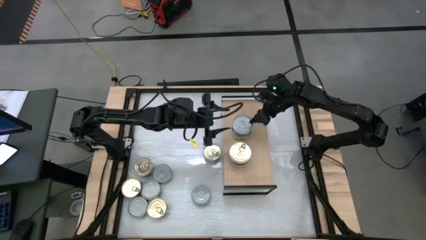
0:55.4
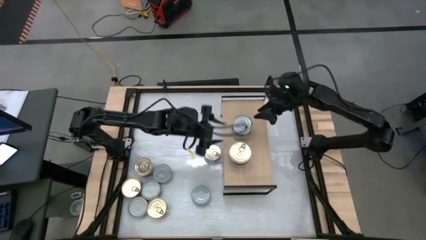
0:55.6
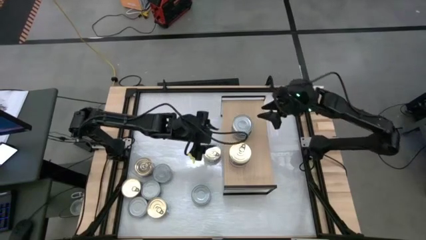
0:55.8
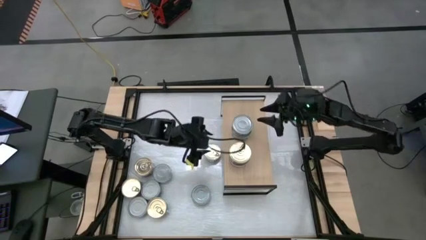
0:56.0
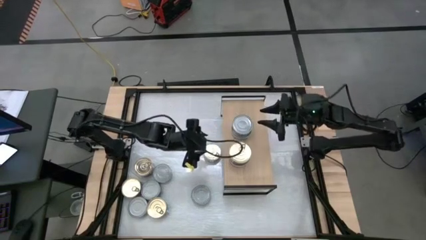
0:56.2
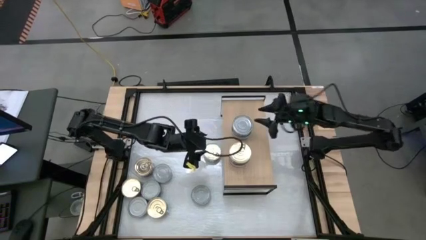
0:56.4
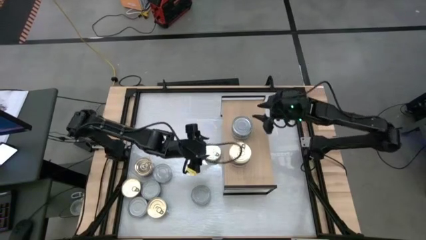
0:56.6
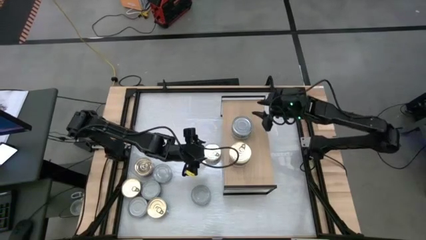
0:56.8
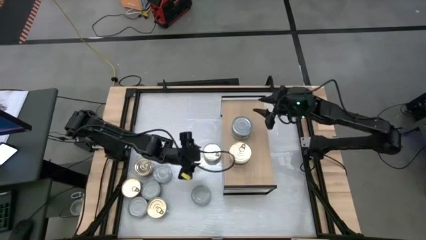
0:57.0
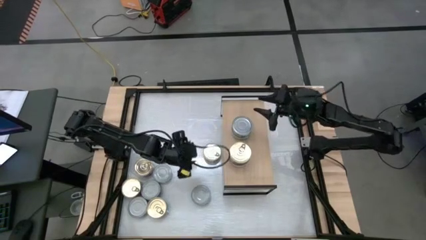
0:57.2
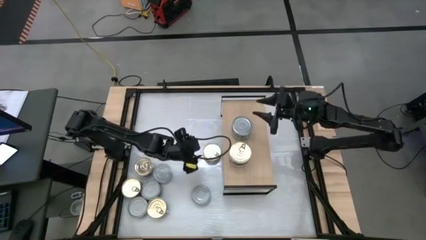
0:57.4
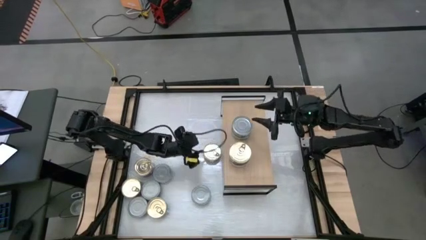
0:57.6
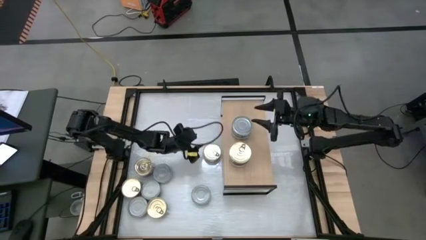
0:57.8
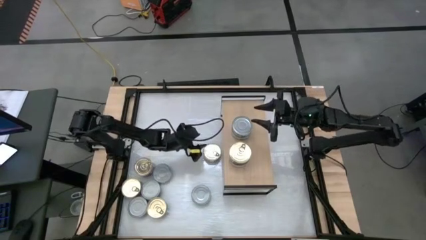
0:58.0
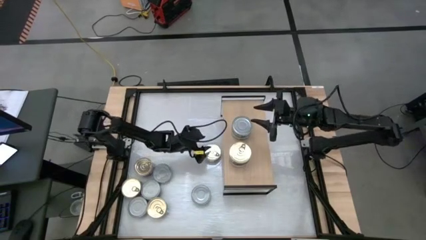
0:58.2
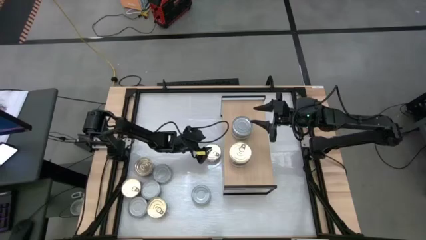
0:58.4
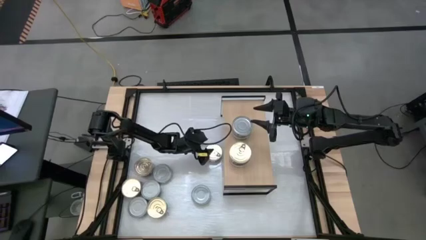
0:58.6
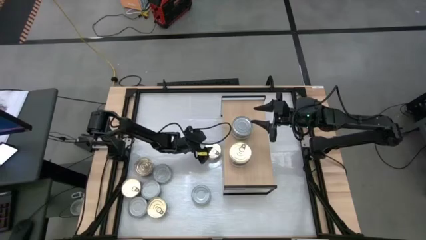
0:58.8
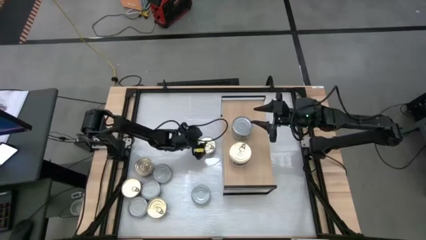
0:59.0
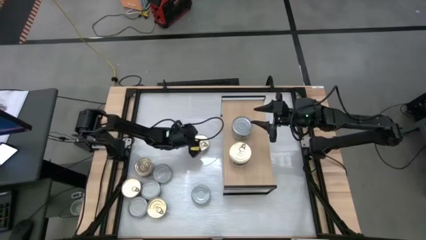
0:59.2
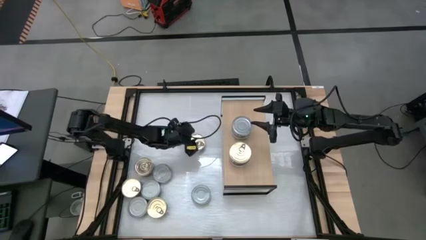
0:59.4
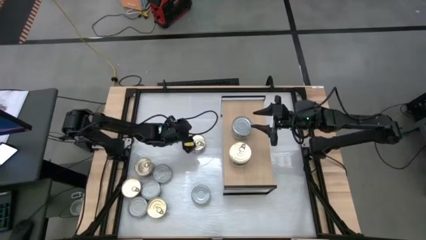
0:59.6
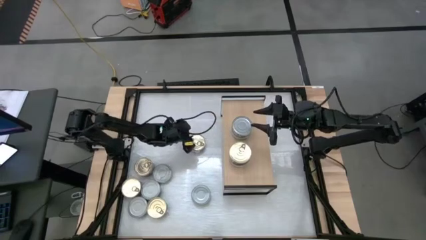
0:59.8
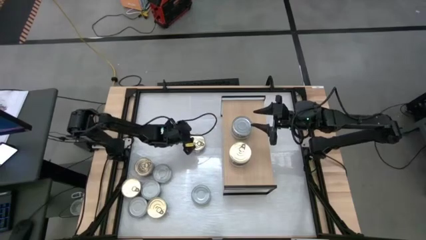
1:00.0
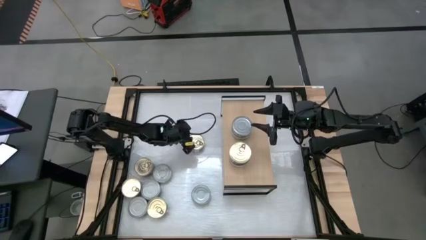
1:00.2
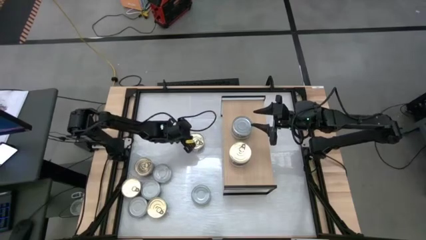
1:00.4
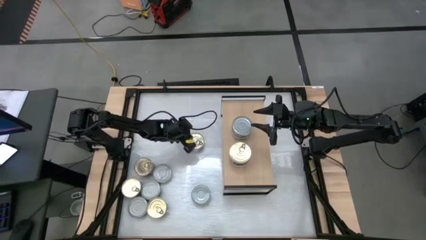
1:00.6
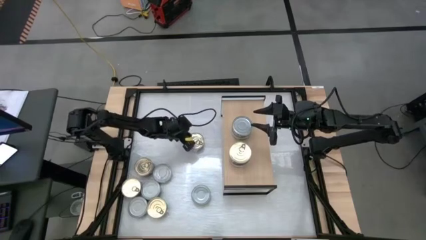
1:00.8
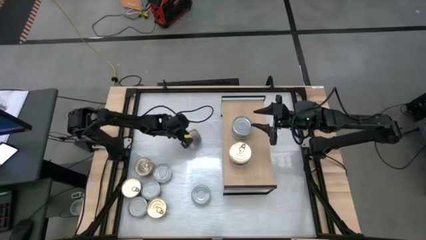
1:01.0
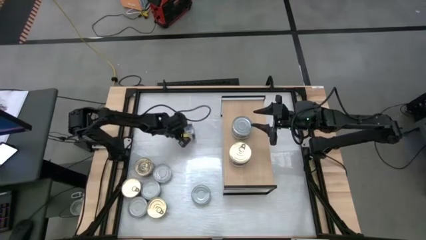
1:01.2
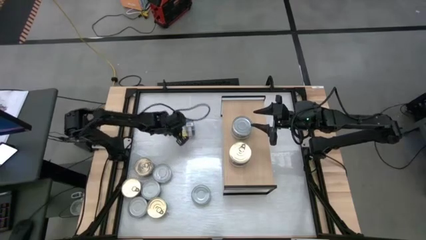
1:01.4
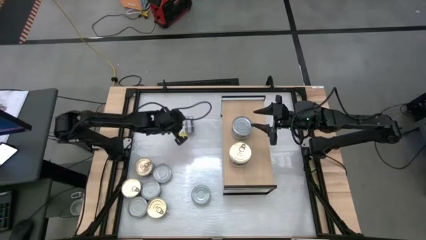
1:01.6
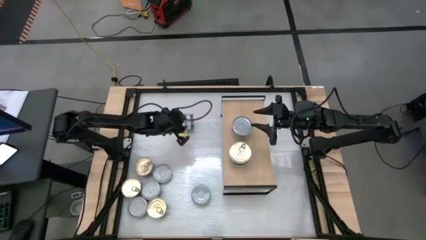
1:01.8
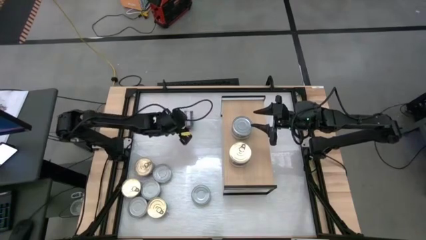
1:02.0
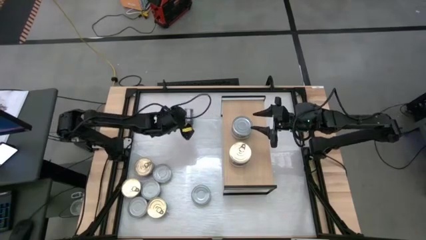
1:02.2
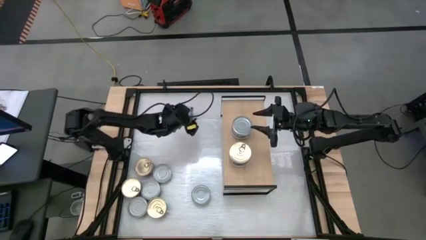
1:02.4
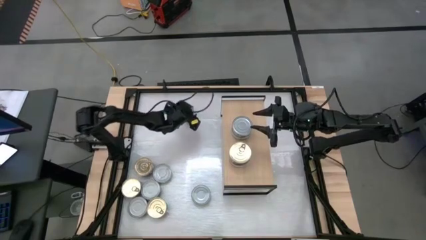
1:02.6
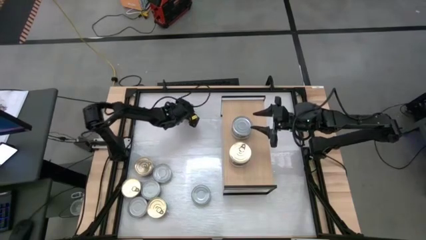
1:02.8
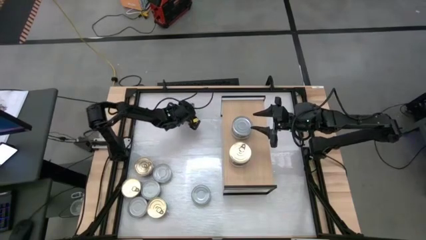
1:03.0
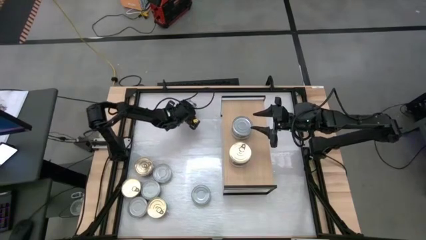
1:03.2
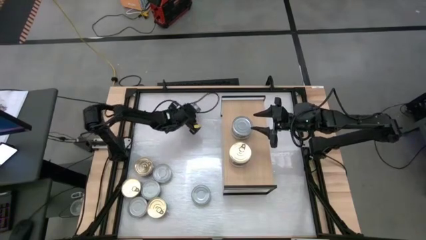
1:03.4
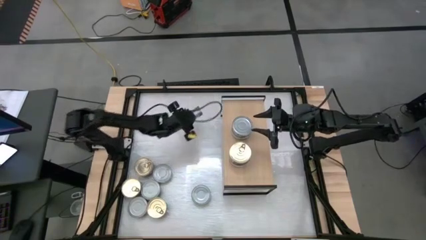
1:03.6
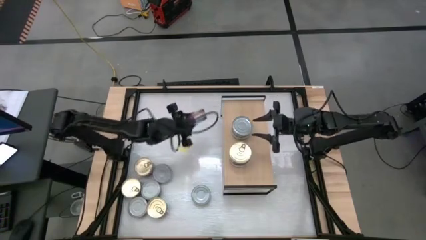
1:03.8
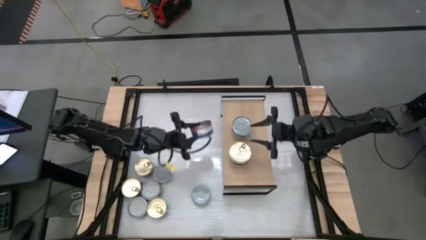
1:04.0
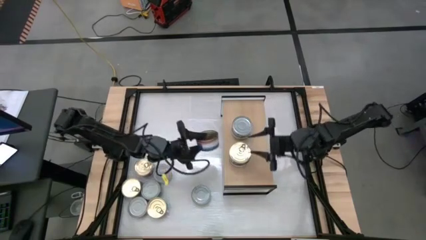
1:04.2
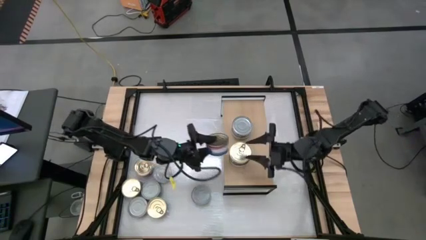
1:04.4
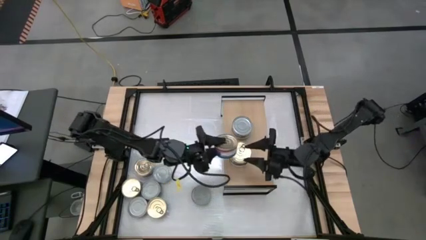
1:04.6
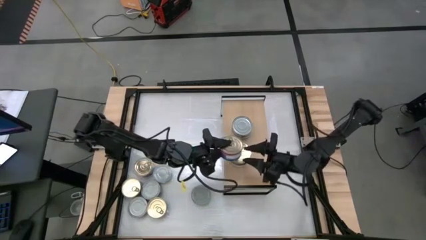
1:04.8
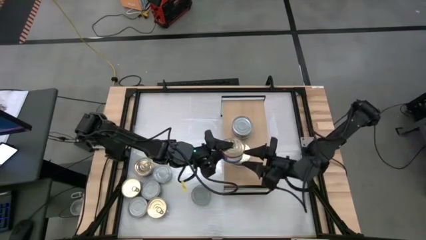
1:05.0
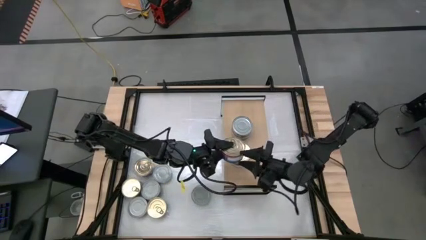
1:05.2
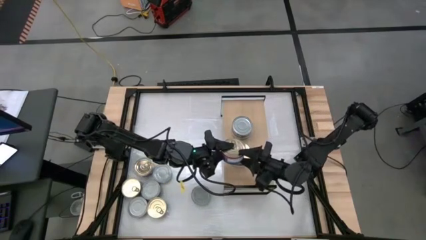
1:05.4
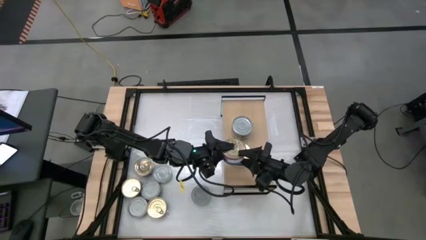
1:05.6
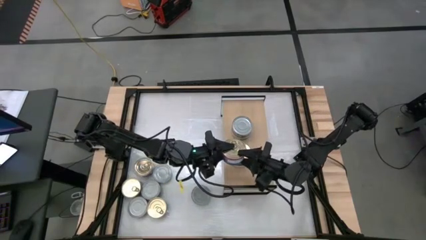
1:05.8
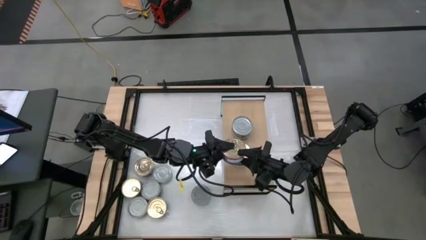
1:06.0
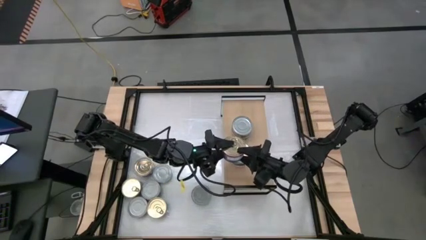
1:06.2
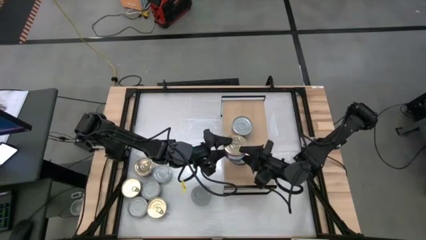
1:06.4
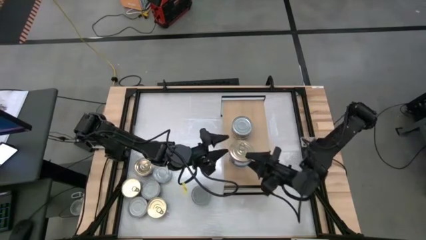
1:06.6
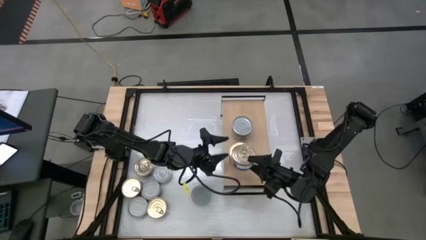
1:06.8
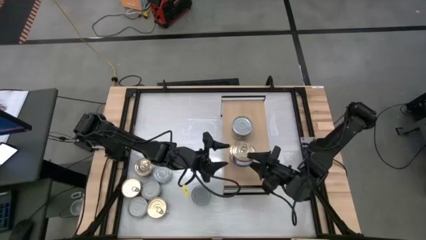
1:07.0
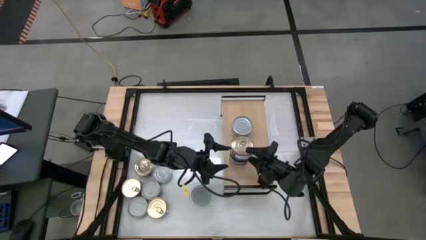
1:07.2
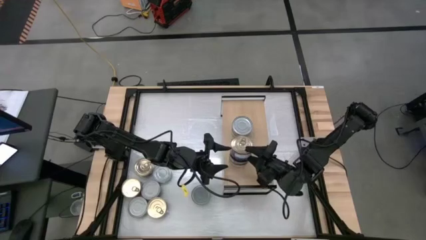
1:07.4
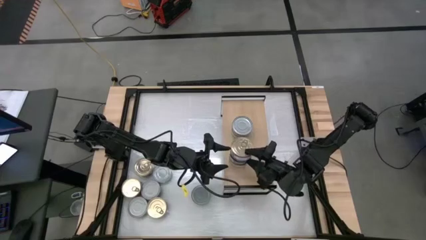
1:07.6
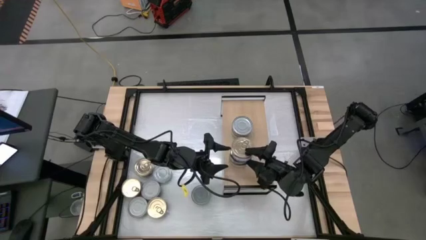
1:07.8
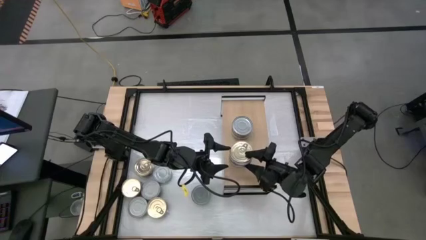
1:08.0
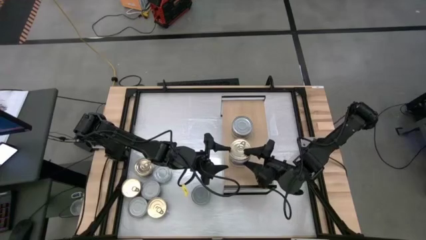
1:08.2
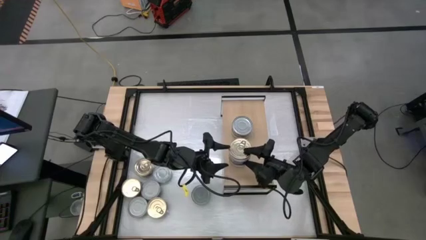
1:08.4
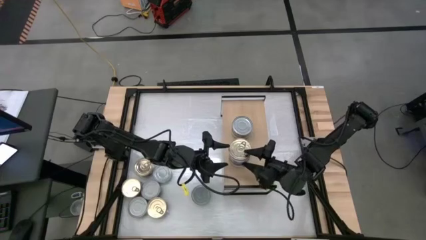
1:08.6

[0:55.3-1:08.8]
Task: Stack canned seafood by type on shelf
Stack the blue tuna can on top of the blue tuna can

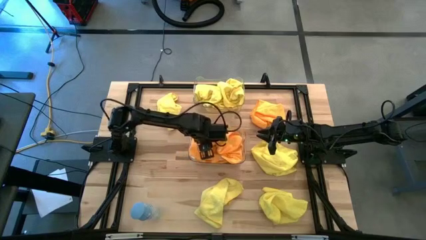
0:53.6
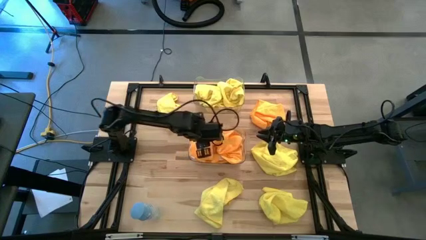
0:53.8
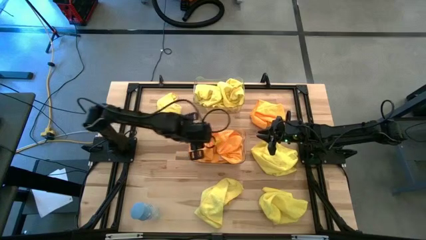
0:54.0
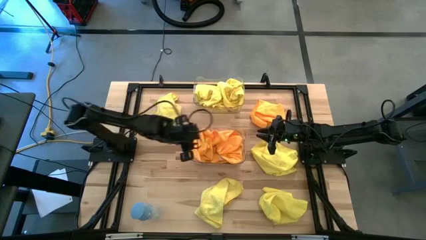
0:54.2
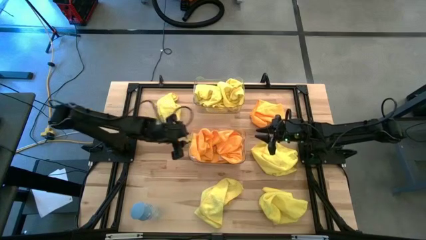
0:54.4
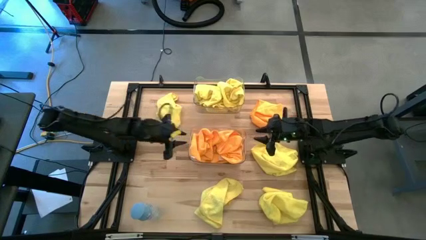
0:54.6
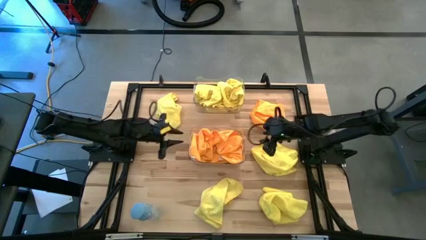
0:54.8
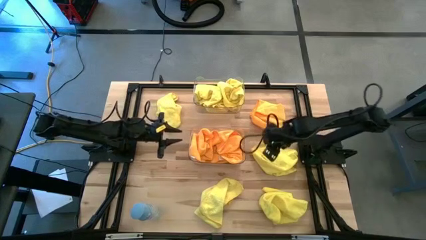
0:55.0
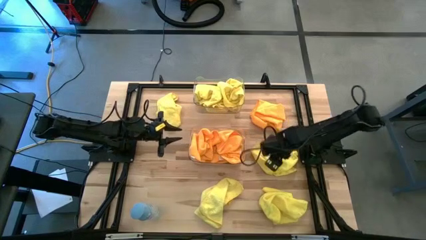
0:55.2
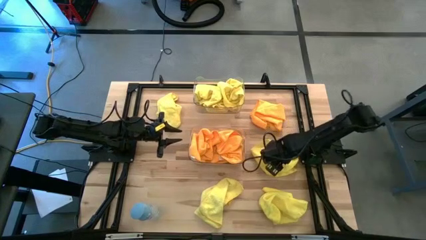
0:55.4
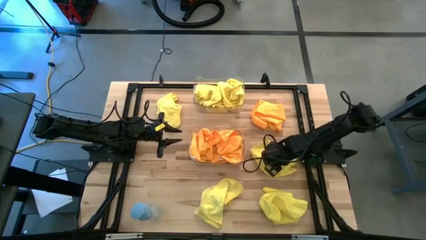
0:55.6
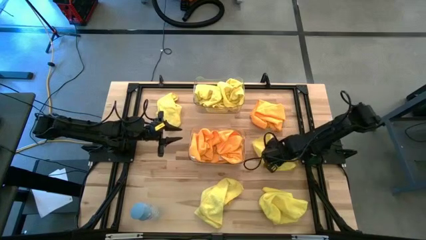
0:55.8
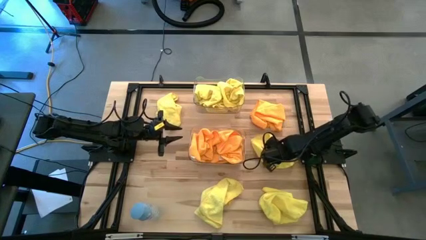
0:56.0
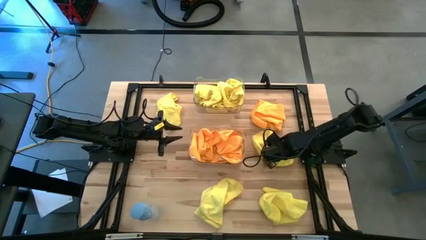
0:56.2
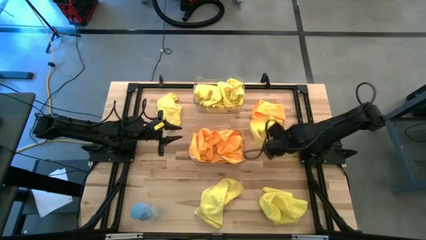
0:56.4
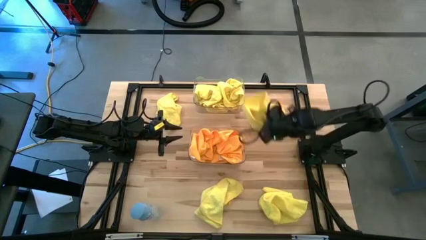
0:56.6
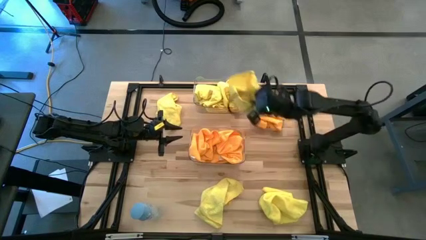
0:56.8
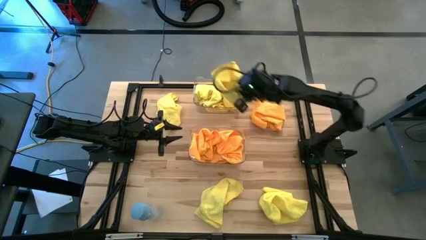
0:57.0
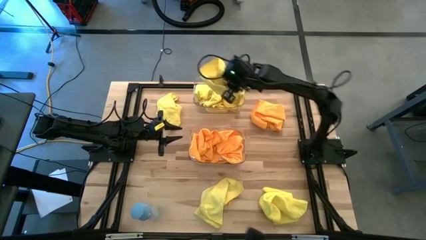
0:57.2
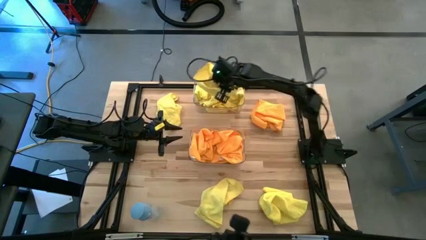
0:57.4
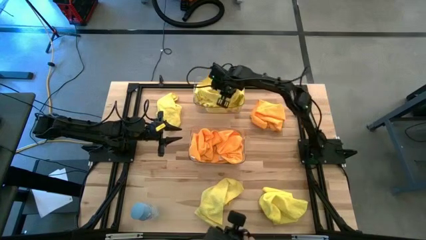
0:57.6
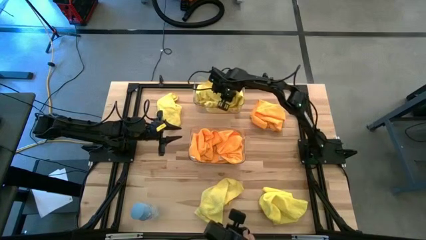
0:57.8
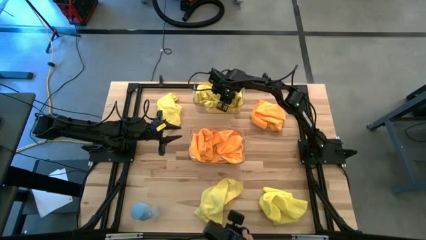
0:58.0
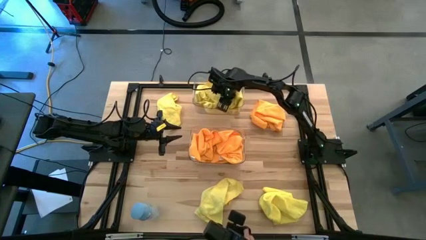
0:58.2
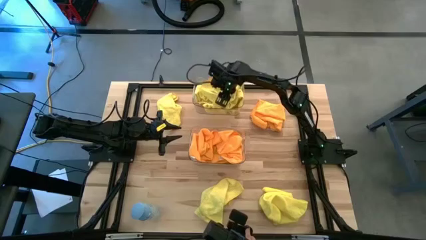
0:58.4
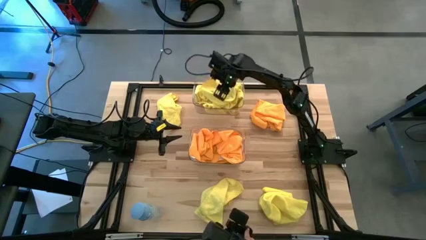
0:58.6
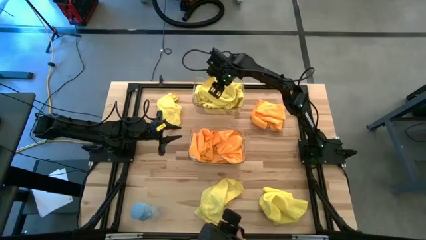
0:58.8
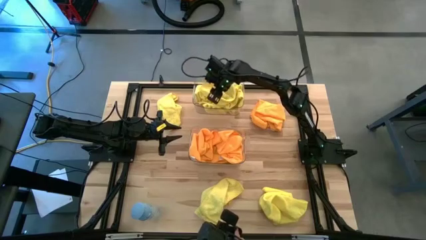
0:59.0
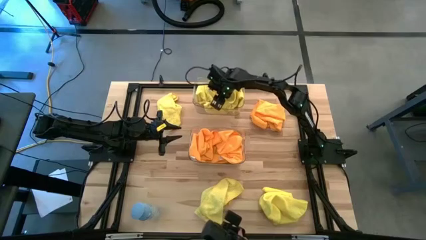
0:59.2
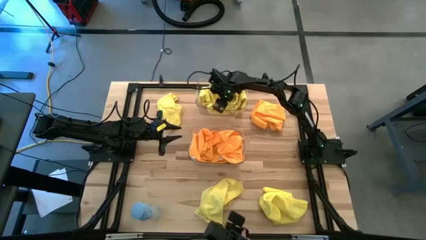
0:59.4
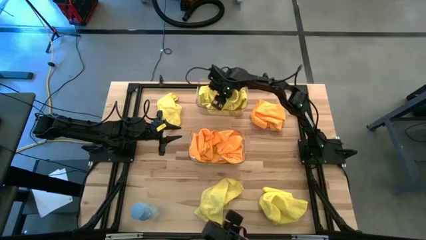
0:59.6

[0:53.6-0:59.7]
Task: Sort microfiber towel by color & place in baskets
Put the yellow microfiber towel into the top transparent bin
